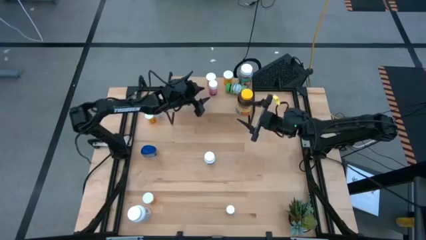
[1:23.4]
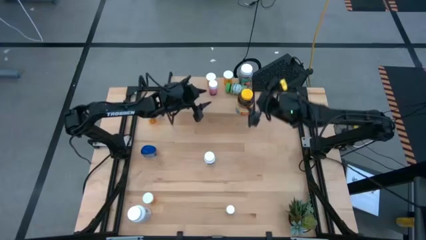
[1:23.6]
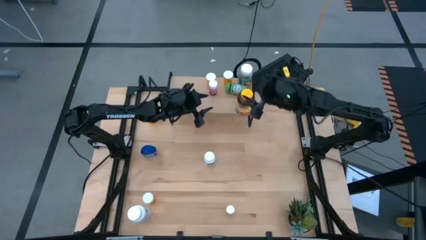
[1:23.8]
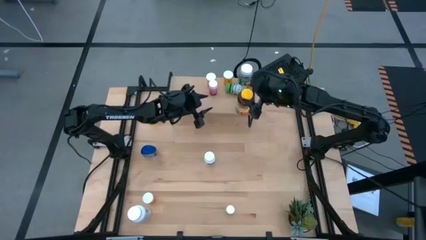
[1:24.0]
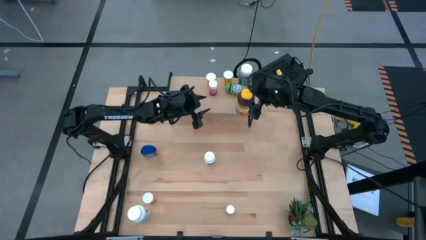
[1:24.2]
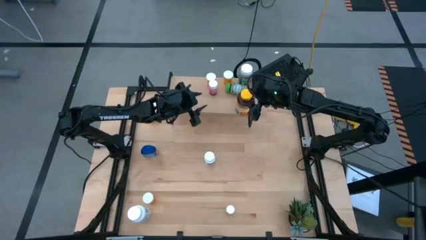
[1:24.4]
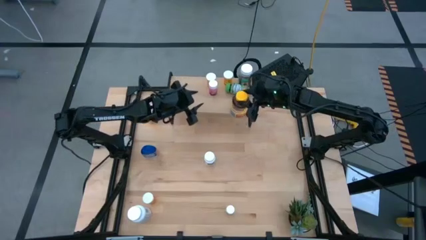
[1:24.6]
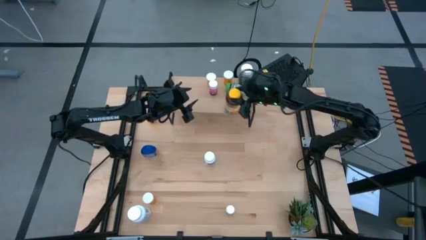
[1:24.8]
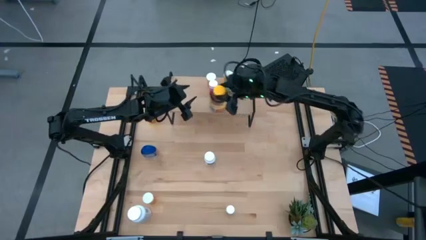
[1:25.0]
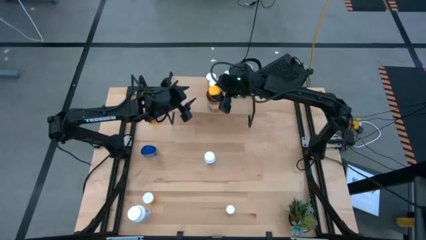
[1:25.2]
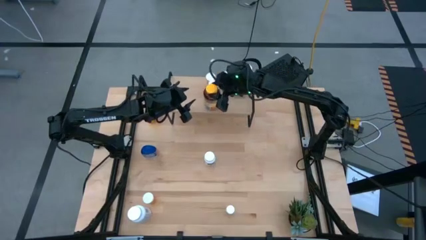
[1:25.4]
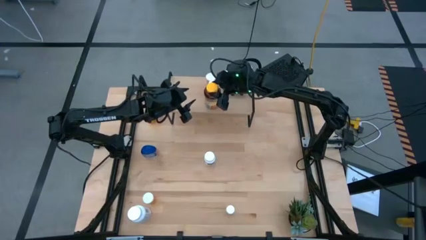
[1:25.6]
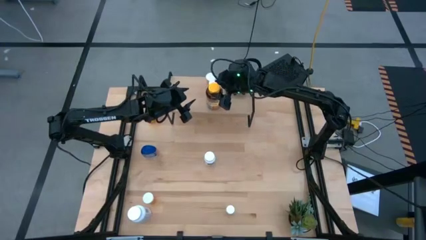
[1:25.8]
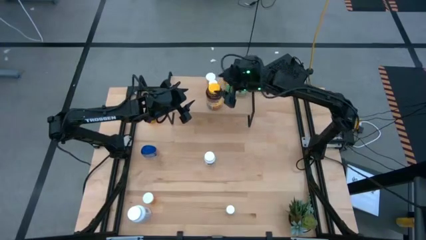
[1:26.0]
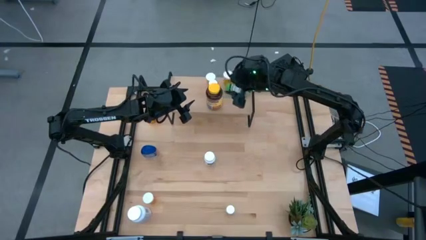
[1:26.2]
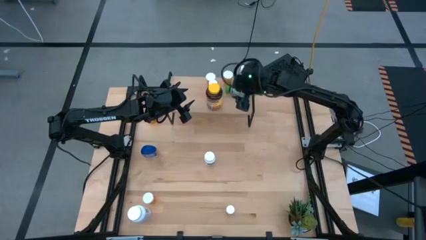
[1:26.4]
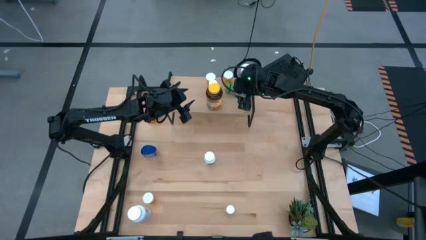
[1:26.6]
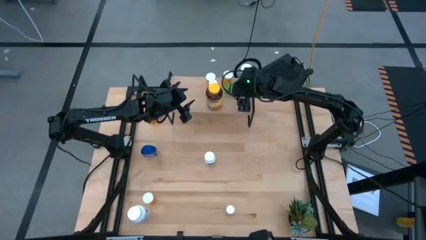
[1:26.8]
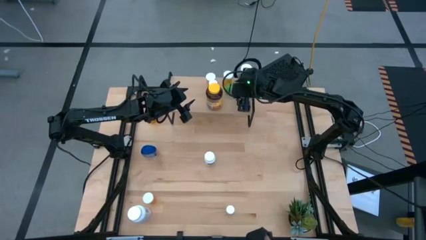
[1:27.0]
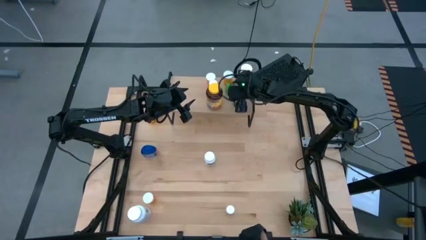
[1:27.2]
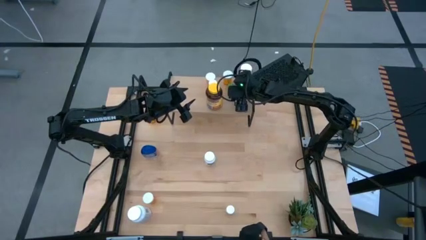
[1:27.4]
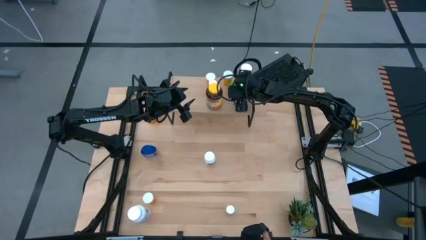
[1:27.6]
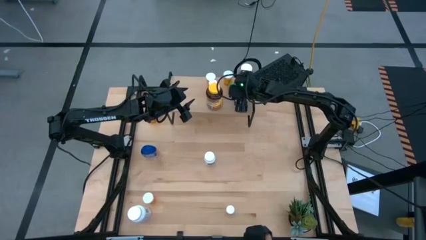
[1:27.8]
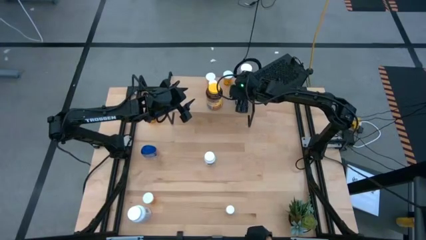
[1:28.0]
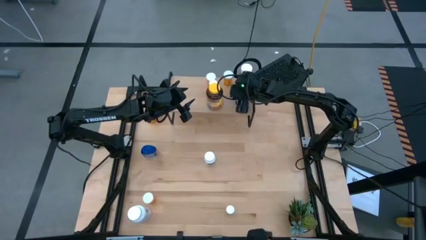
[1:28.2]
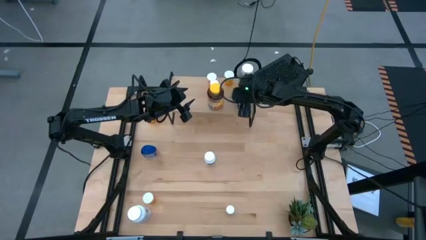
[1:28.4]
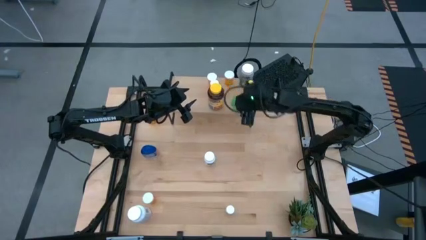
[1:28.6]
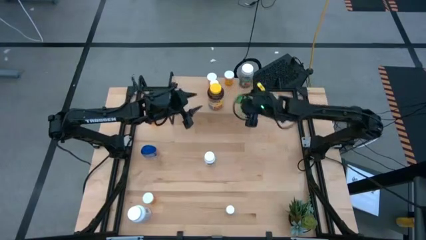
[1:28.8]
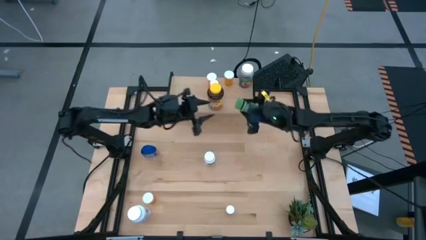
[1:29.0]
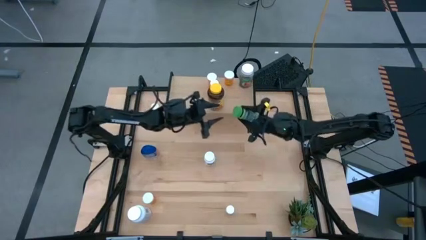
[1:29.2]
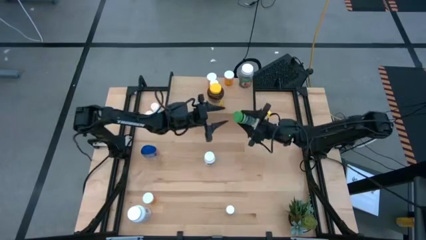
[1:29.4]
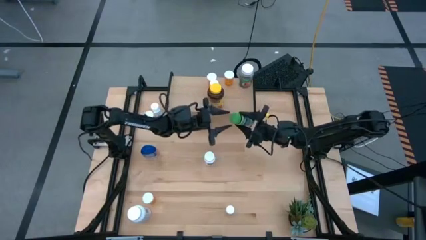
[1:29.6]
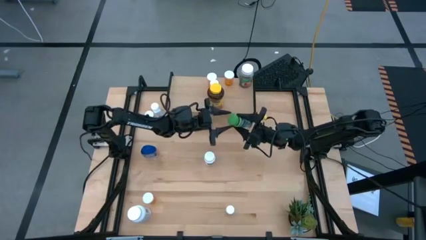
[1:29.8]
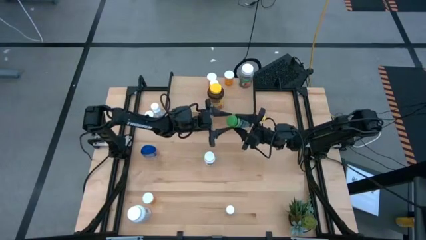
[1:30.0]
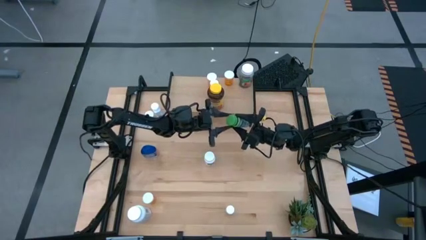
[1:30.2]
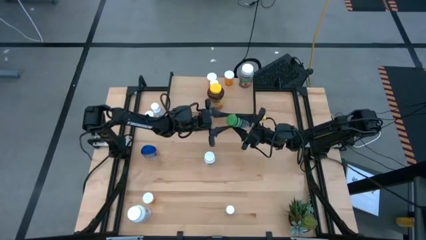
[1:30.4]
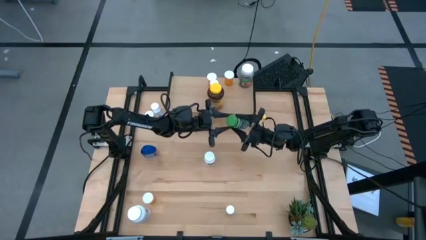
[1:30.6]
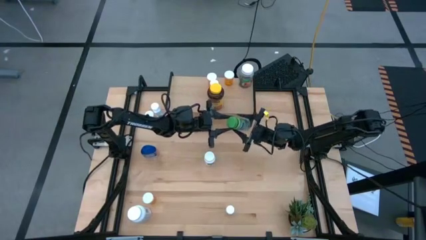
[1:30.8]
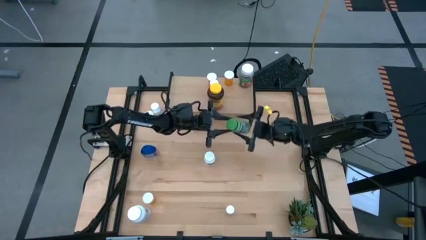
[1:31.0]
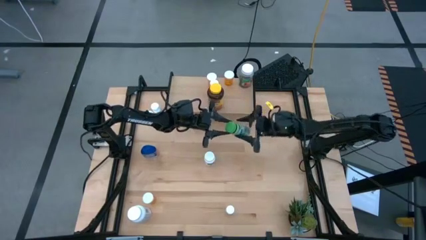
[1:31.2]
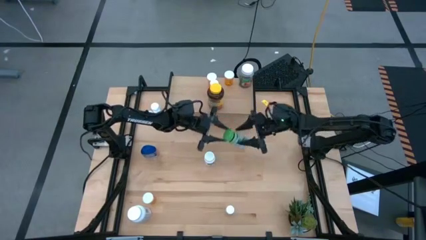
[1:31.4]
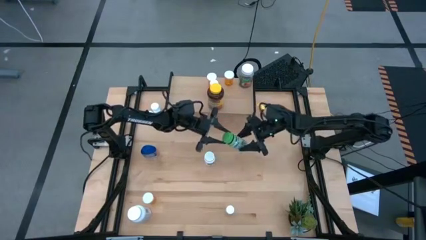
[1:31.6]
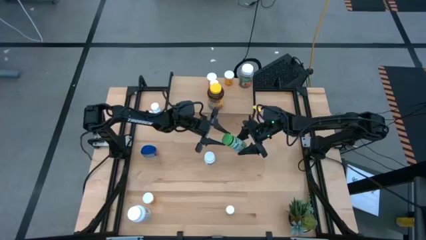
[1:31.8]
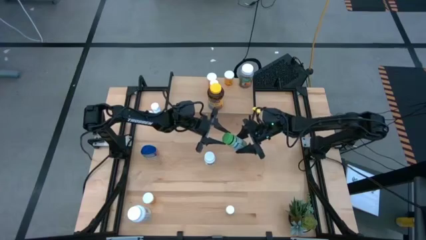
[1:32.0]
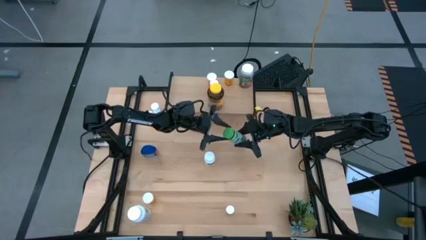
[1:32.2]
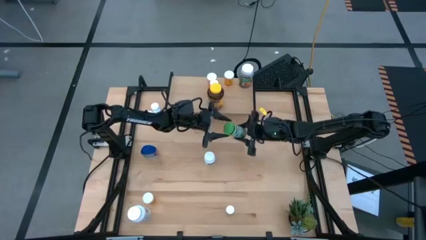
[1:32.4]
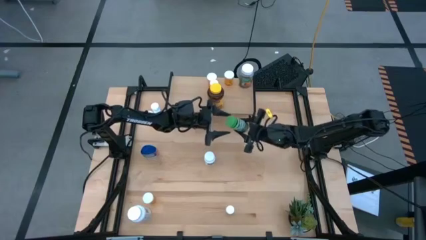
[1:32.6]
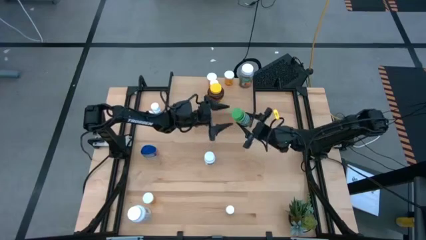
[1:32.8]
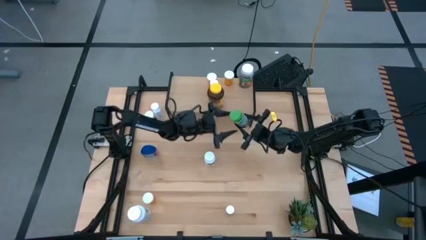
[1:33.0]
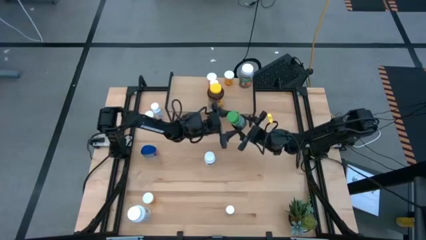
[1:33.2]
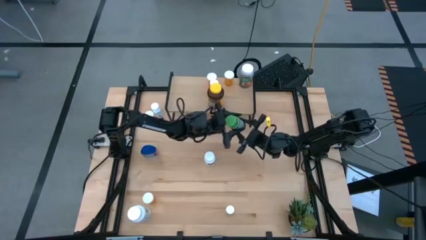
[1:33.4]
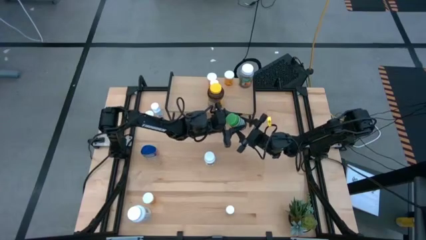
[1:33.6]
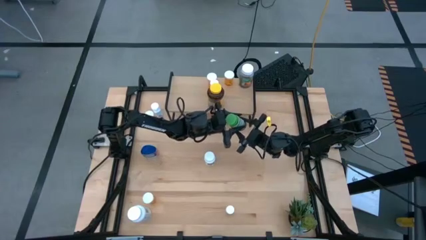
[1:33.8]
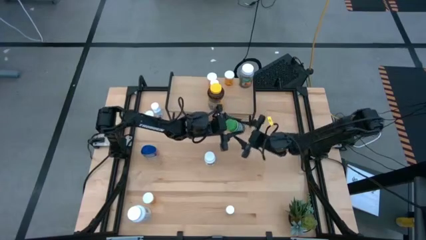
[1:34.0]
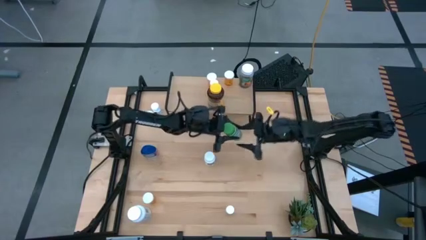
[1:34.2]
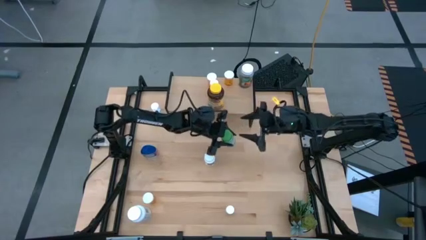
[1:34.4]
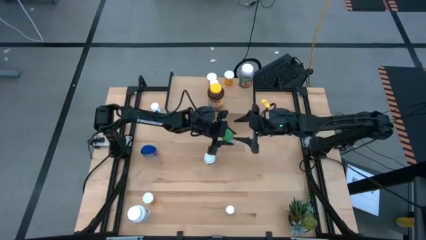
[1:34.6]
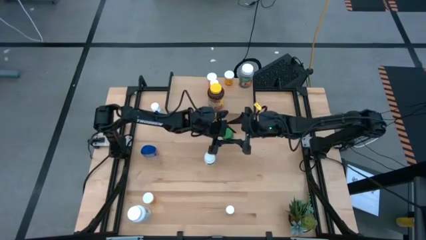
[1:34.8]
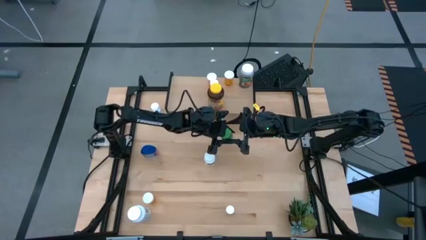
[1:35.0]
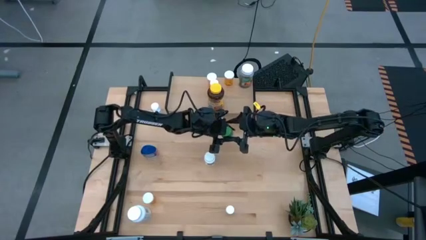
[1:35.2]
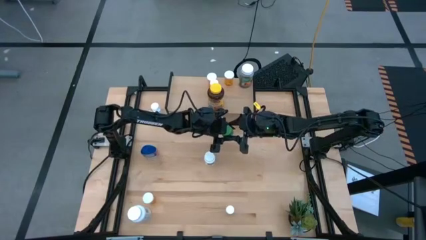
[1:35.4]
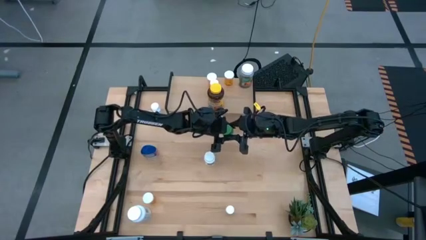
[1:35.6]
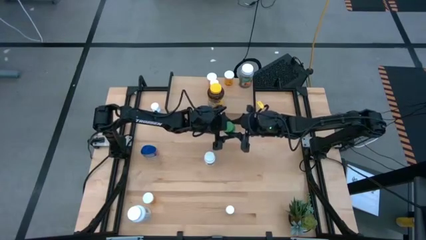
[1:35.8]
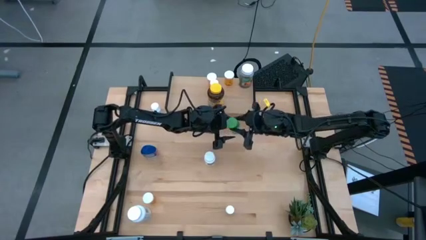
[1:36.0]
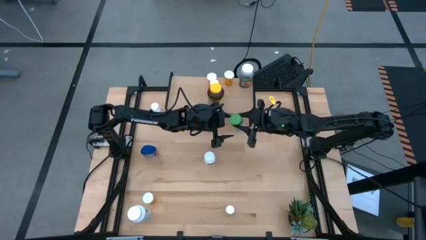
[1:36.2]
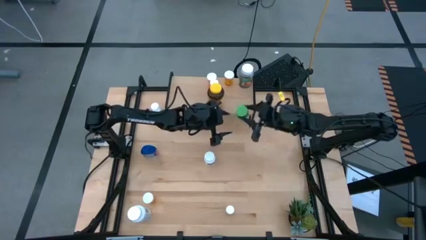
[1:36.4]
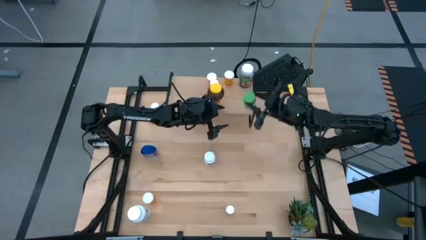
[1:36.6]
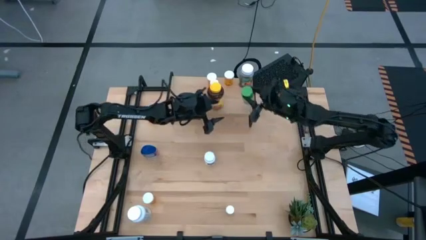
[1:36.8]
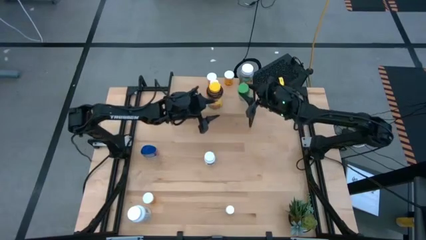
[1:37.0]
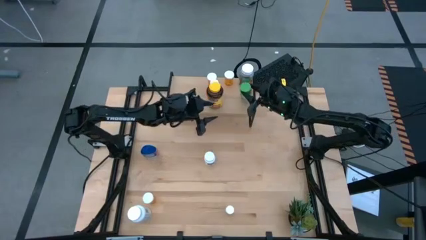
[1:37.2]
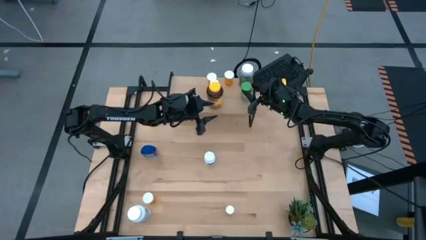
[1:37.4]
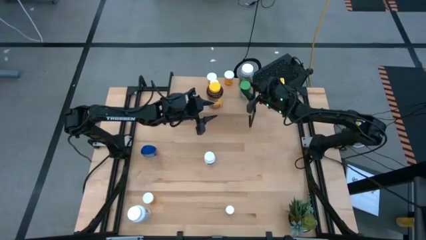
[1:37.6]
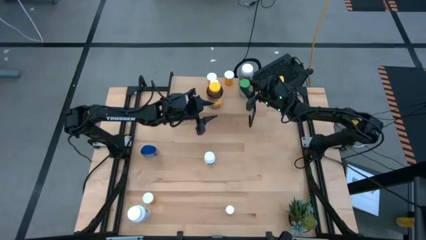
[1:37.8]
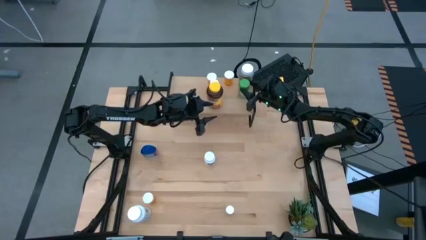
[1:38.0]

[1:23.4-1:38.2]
Task: Pick and place medicine bottles onto shelf by color
Adjust the pill bottles on the shelf

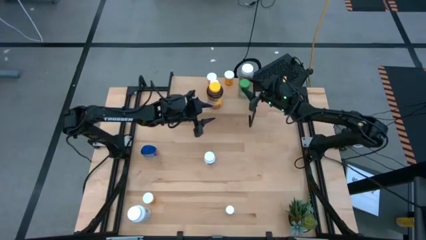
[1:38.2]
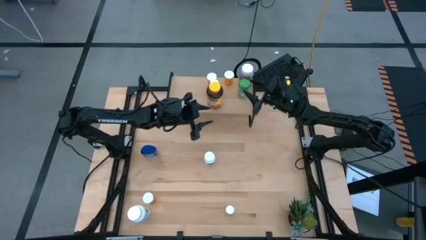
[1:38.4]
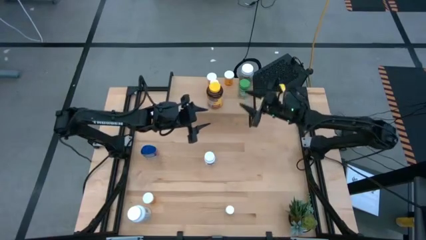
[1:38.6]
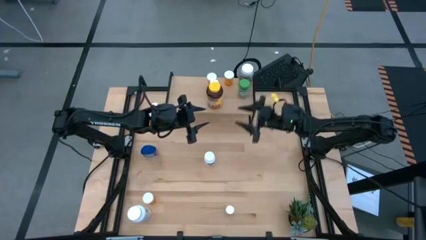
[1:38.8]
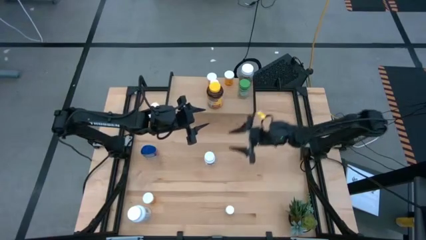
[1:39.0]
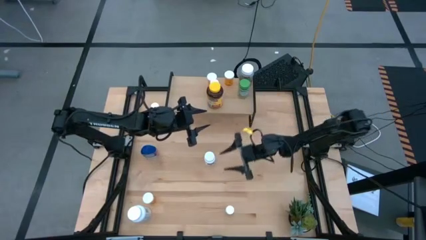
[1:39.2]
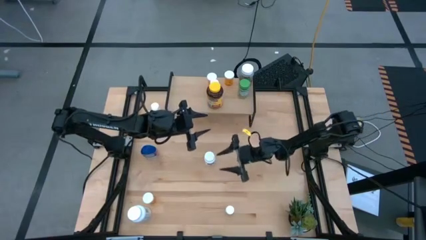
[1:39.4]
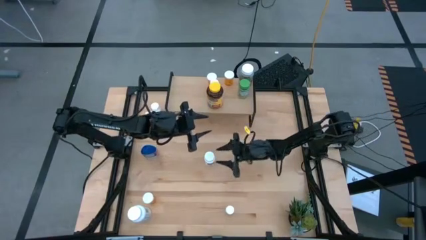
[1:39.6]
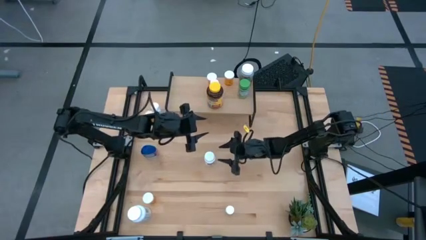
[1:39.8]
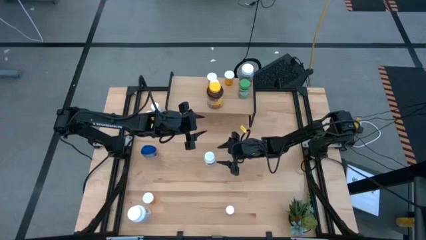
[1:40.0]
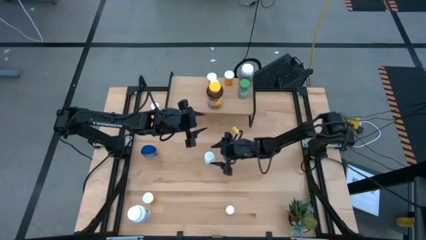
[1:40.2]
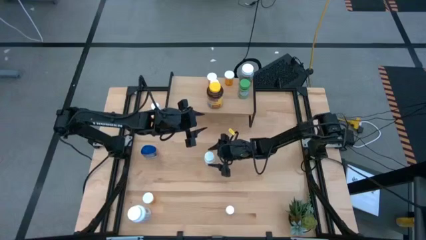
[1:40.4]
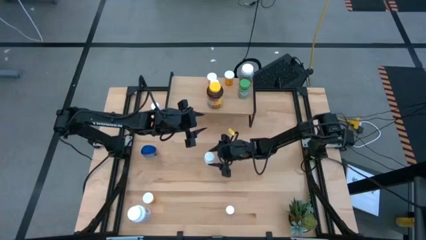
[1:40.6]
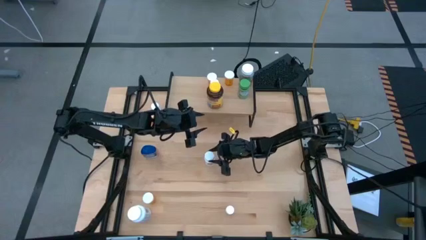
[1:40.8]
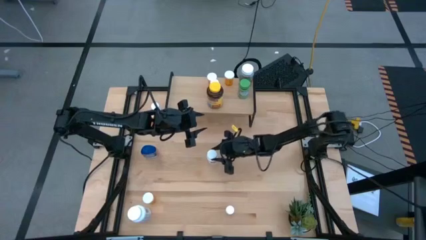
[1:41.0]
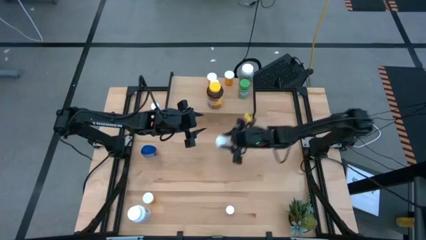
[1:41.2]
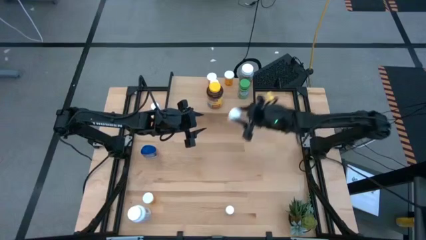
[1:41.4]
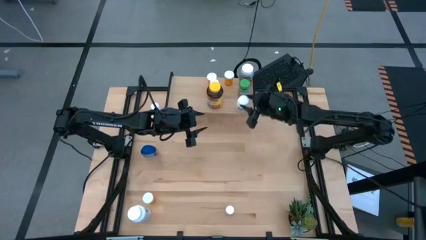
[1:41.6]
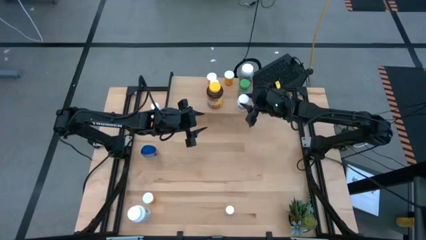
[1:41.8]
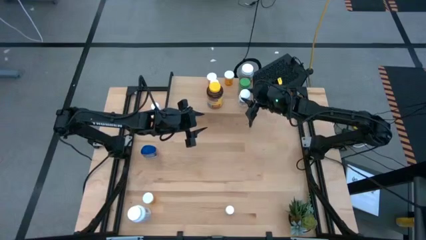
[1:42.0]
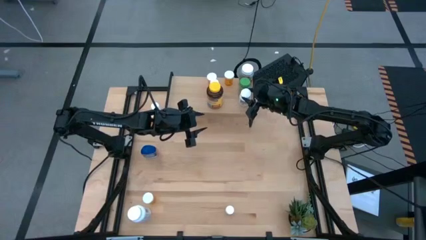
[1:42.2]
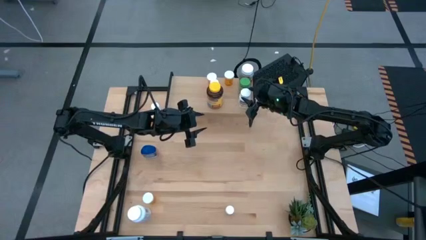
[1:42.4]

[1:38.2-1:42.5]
Put the white and green pill bottle on the shelf
